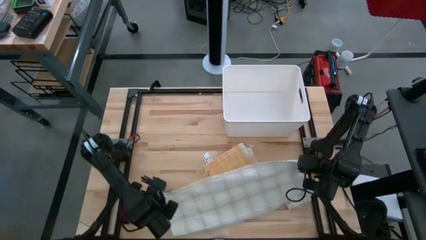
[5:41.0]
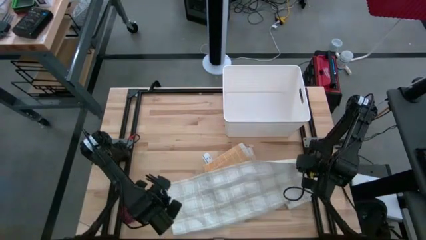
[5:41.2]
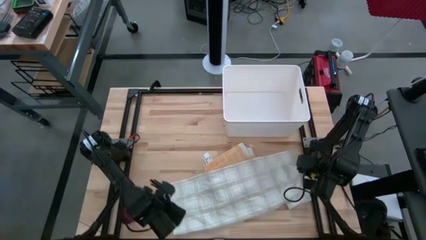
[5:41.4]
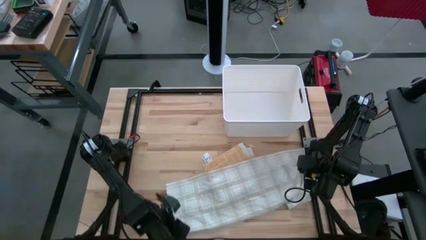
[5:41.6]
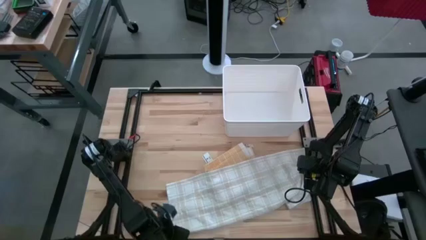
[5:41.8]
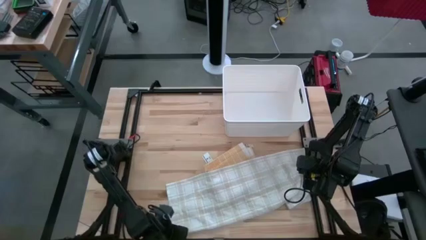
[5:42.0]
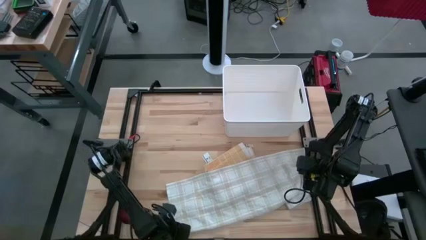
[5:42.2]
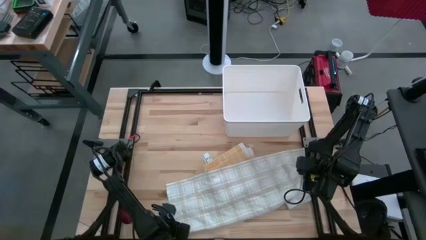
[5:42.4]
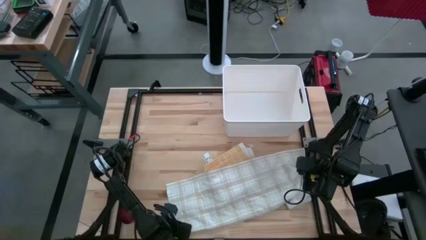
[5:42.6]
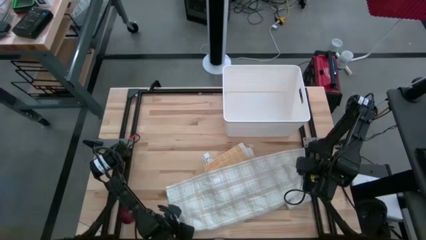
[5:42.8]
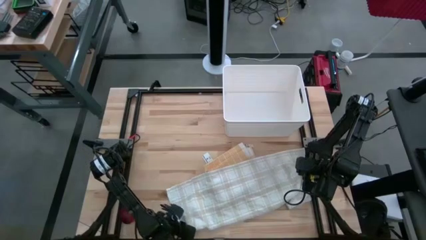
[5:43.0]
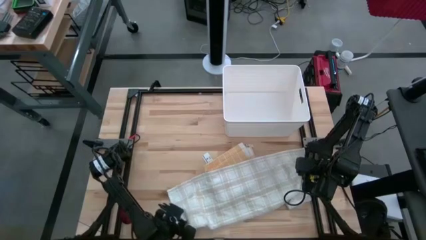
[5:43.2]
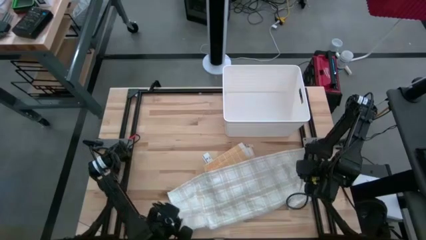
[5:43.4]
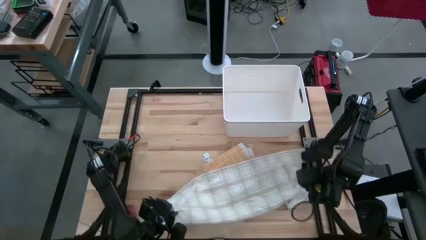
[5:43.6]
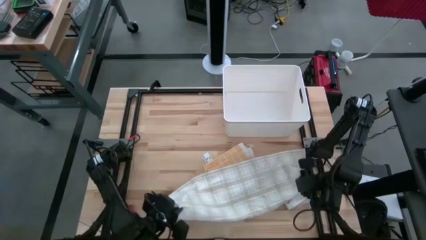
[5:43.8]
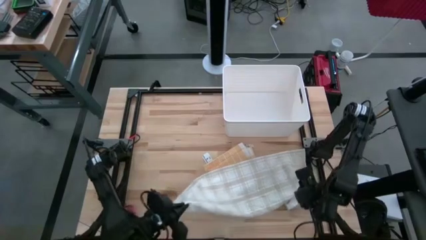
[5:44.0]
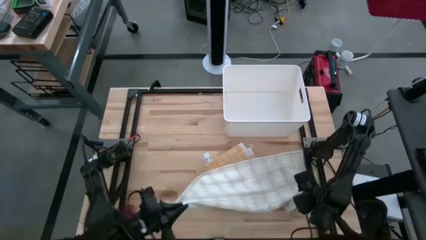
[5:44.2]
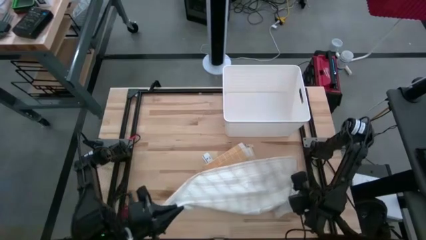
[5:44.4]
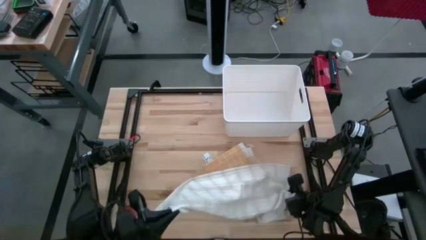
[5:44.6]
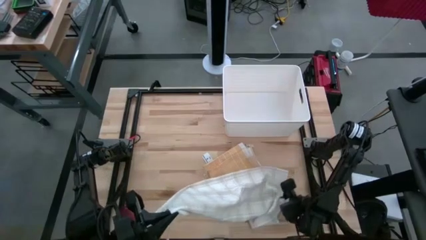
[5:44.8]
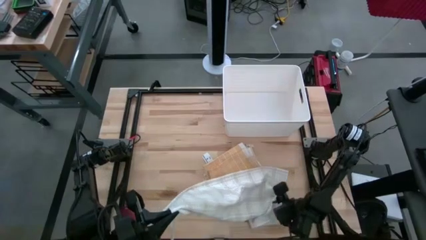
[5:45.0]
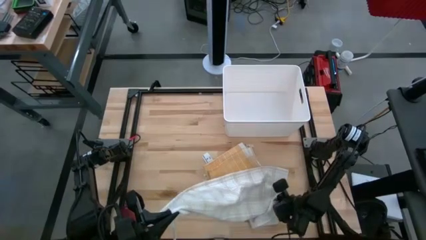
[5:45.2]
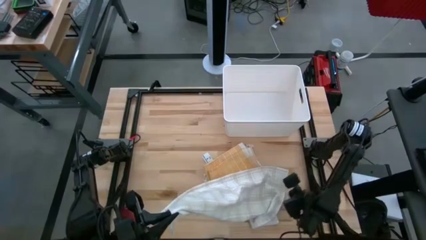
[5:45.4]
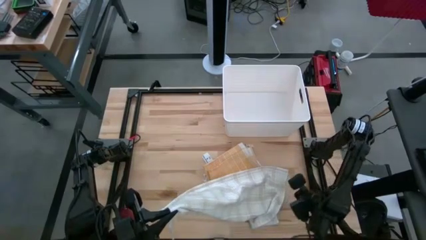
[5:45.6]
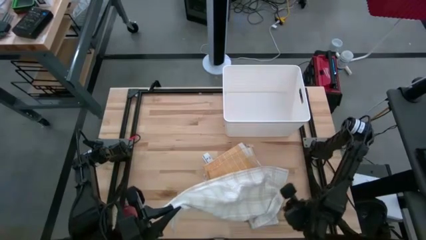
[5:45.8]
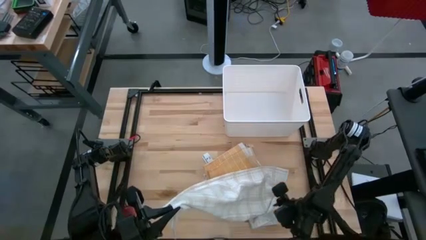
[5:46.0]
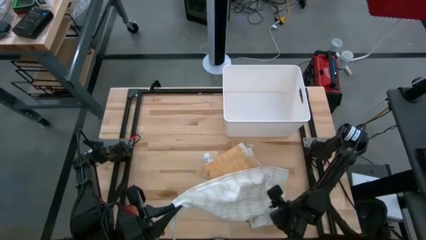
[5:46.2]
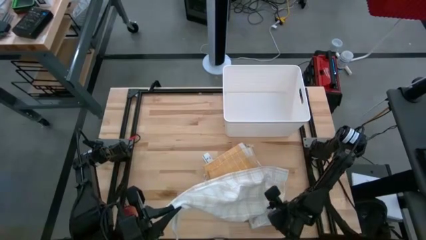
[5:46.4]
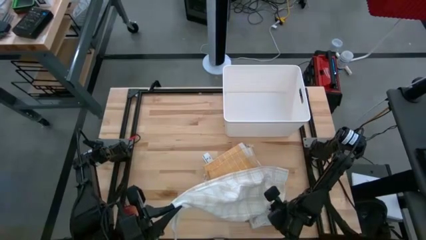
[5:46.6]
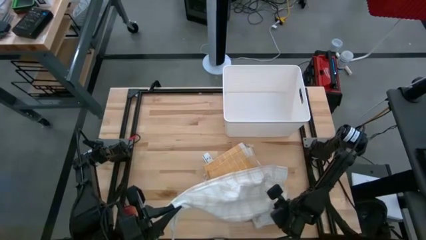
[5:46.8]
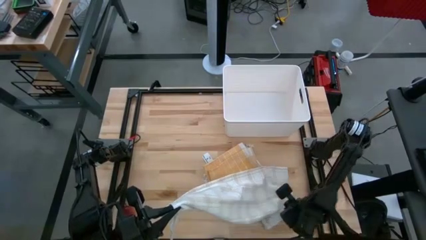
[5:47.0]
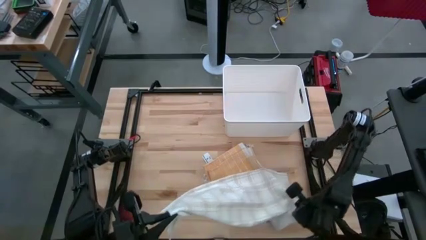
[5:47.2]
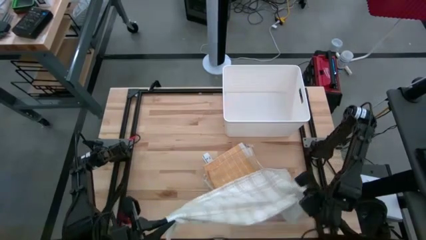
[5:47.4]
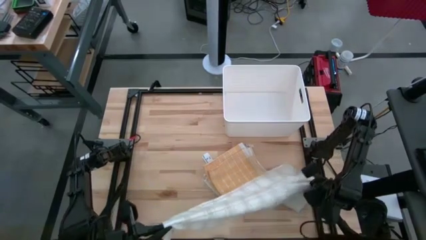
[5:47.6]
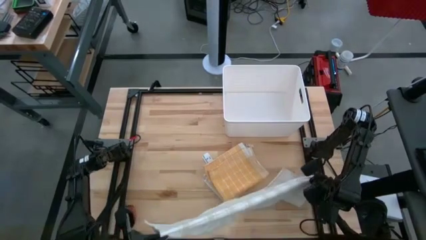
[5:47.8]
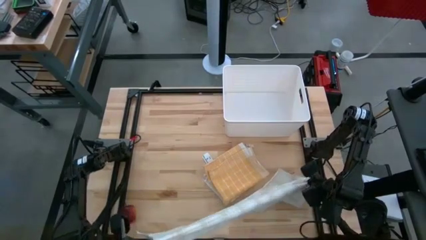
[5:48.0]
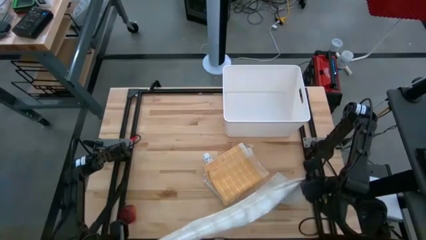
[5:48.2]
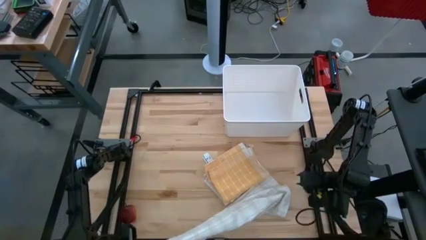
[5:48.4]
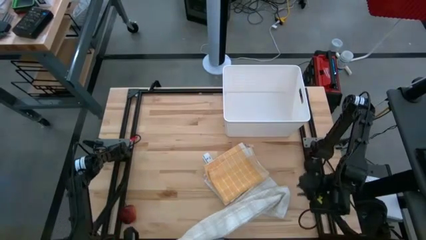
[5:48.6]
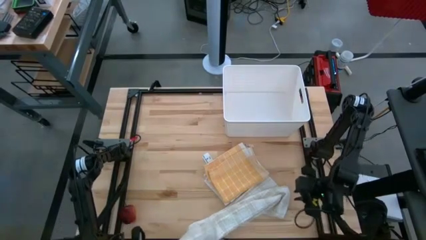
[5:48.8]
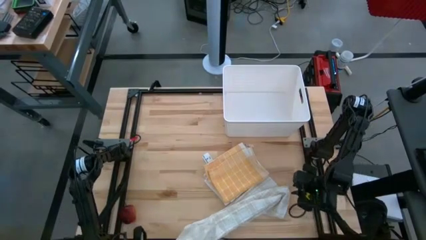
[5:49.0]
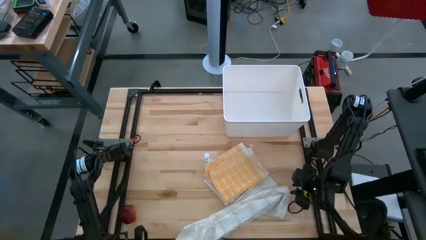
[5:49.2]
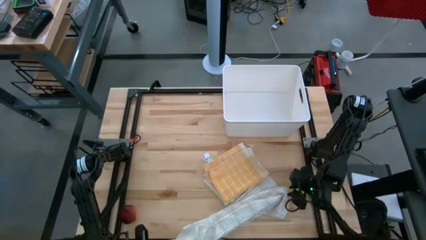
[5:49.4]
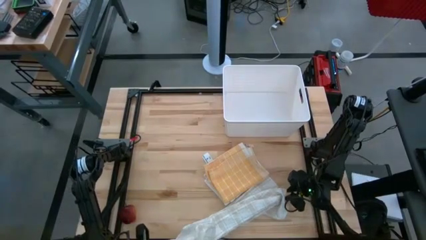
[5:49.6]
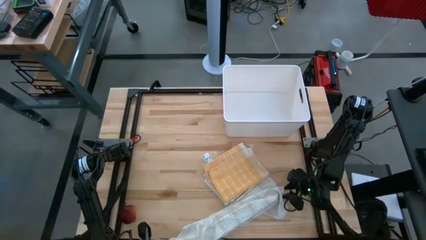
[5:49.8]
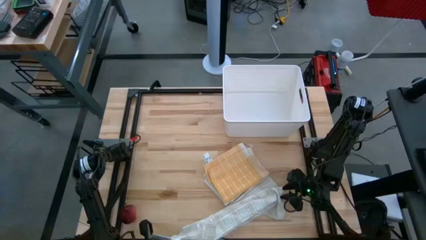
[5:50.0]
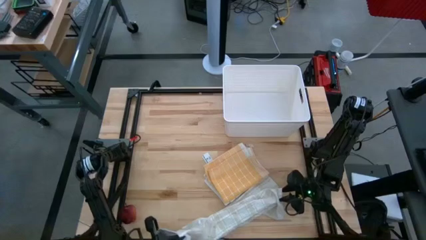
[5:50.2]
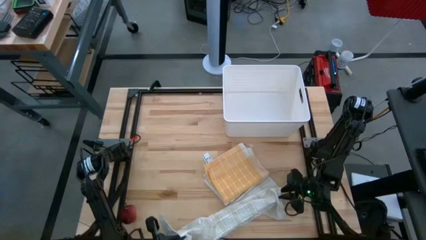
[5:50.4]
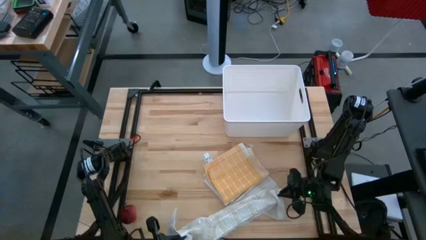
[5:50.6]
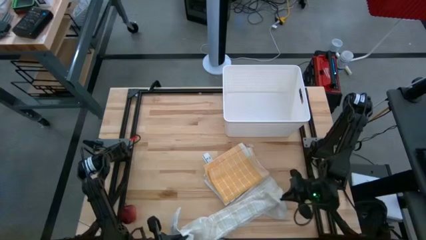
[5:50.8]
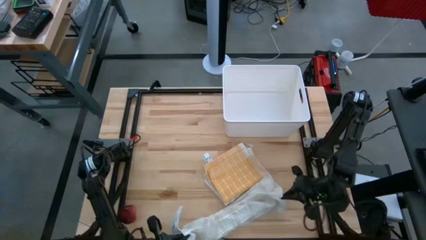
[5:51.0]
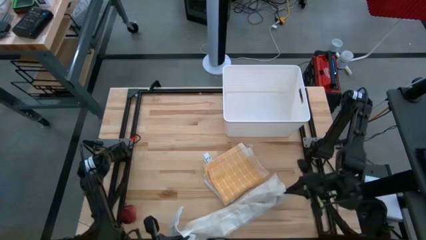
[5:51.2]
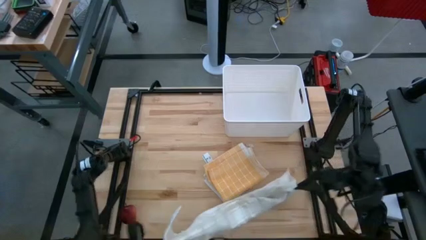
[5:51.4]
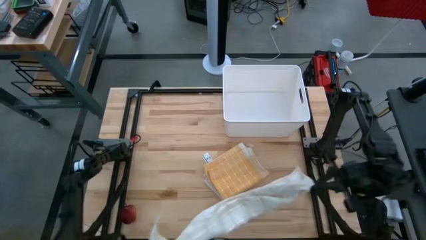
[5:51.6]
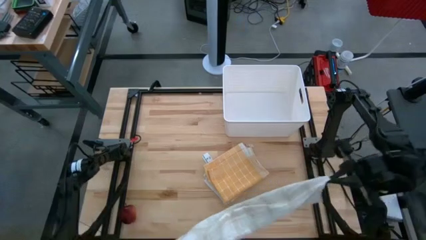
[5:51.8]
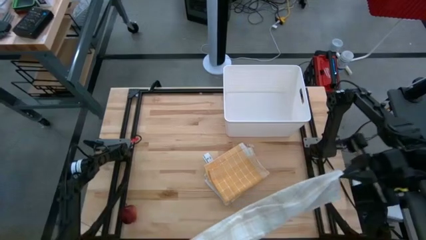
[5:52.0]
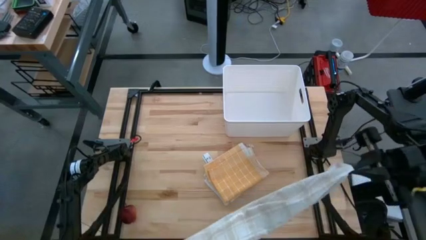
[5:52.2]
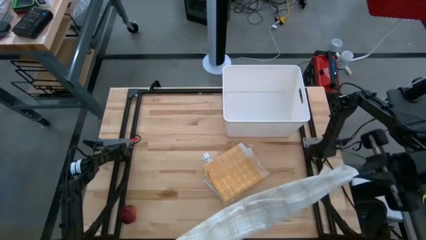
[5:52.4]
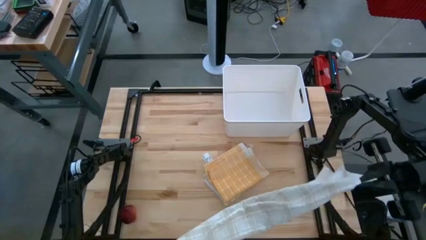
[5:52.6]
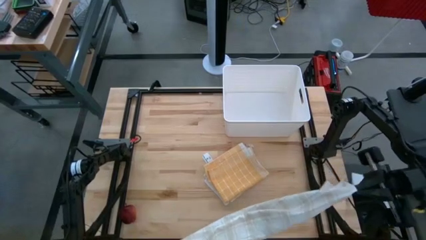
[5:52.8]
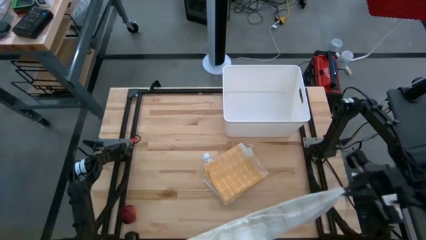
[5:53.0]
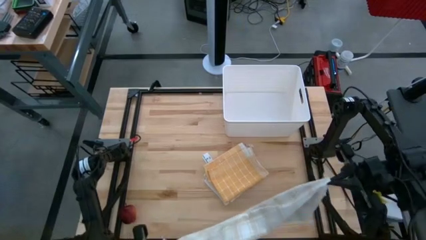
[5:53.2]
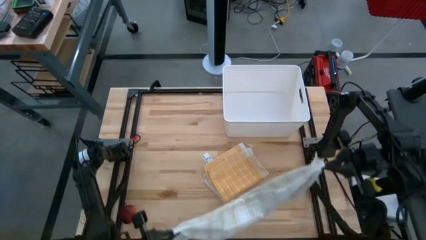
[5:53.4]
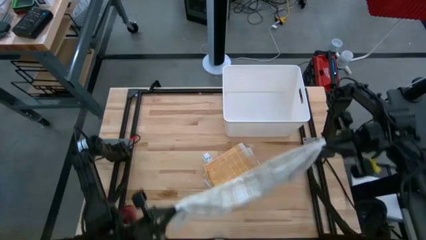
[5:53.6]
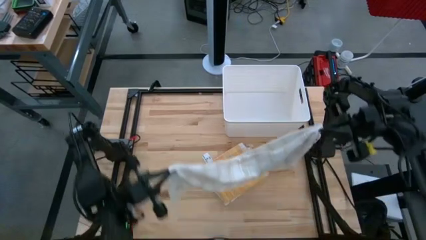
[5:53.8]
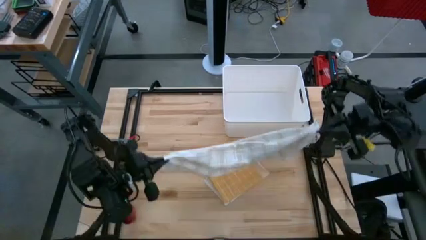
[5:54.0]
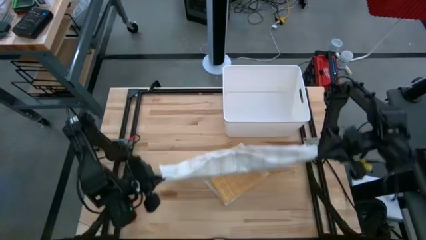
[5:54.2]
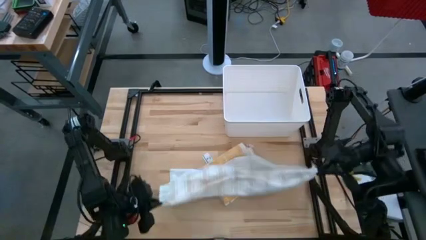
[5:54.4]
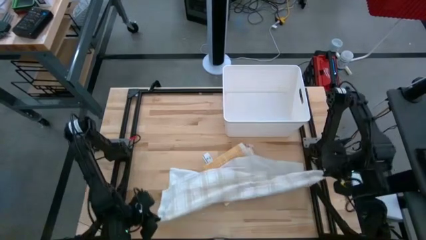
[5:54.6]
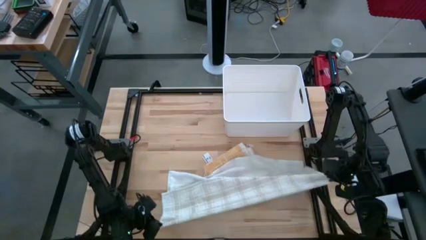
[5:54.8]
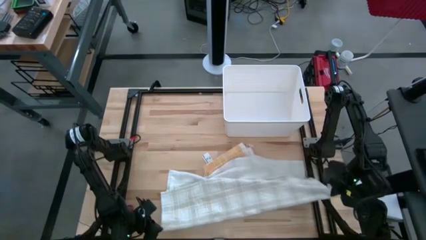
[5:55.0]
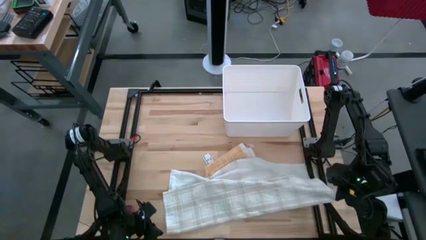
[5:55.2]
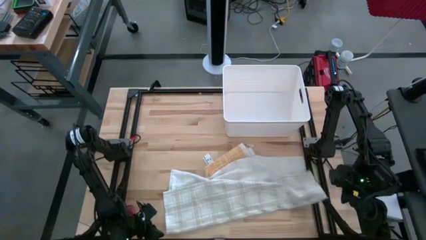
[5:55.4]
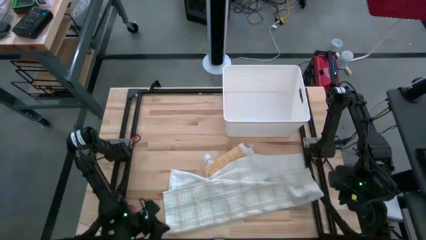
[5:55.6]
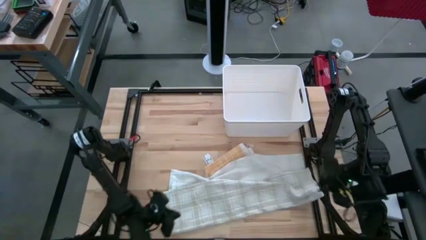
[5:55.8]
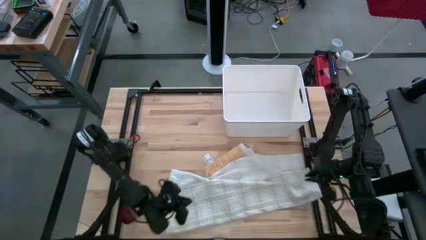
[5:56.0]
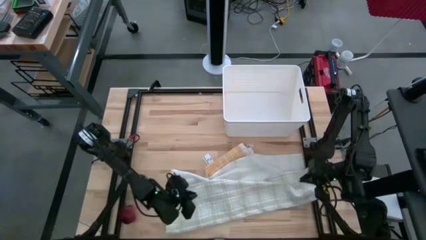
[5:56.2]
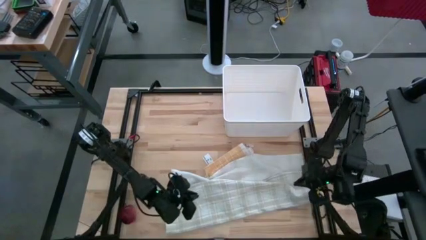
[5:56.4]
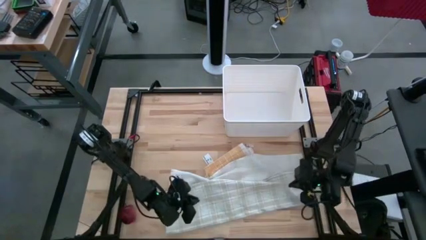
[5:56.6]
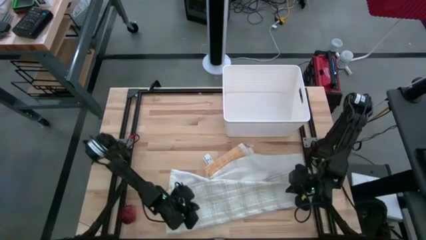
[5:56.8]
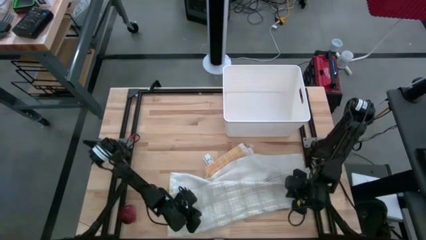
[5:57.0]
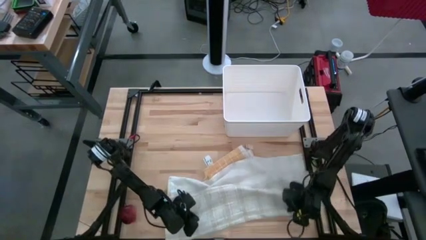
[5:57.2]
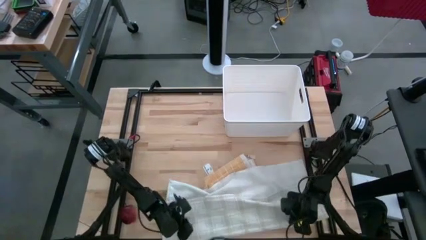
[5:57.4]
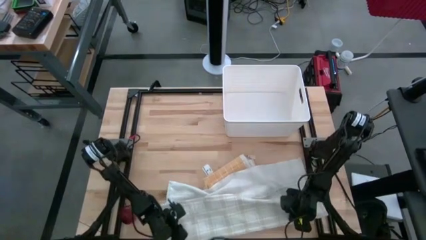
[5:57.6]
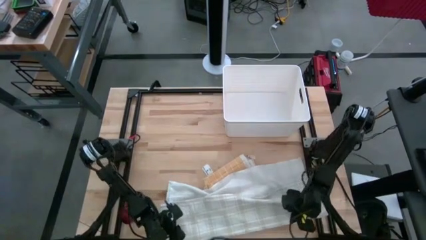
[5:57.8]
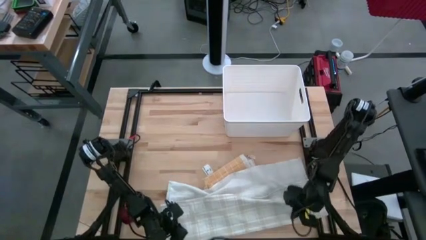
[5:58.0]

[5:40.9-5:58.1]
Task: Fold towel
Fold the white checkered towel
